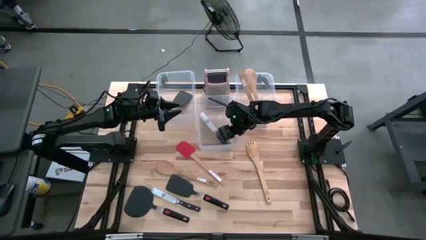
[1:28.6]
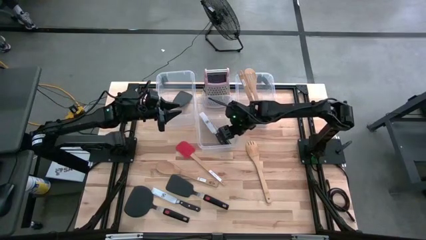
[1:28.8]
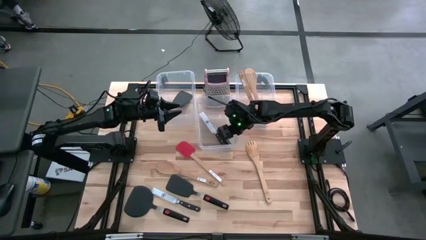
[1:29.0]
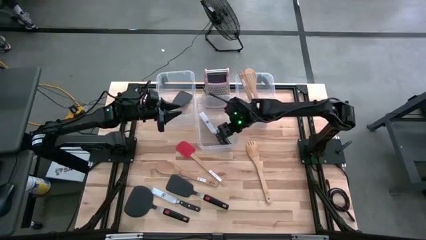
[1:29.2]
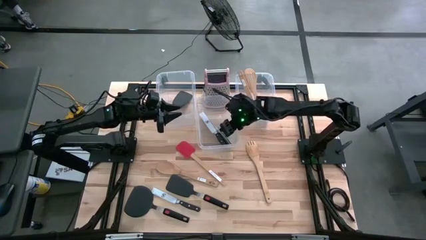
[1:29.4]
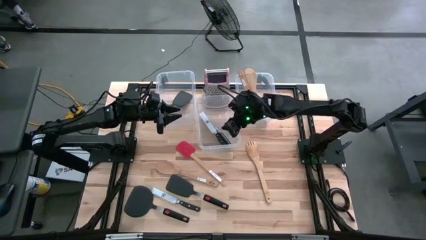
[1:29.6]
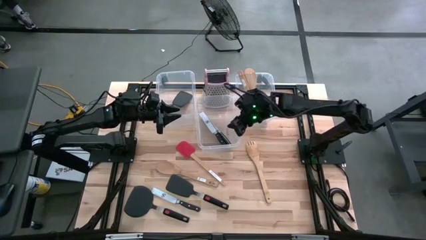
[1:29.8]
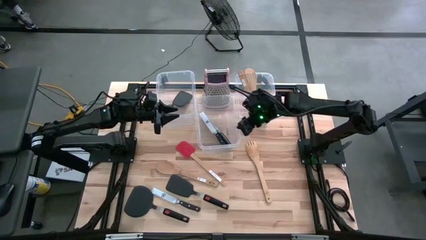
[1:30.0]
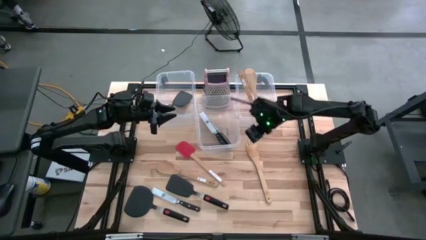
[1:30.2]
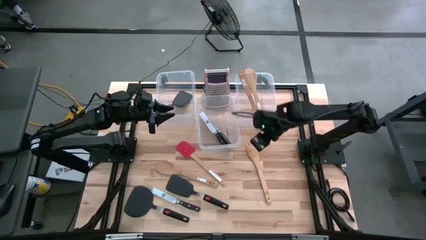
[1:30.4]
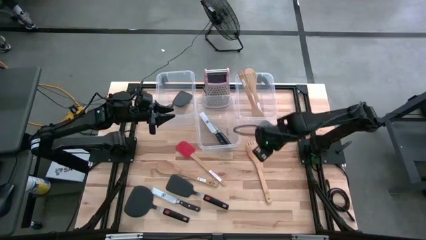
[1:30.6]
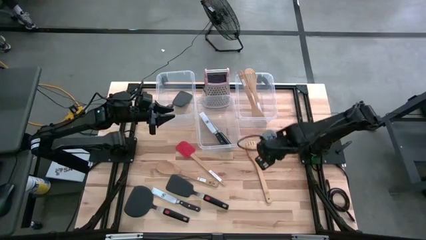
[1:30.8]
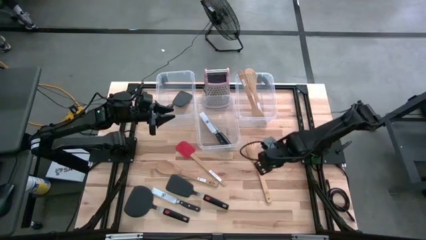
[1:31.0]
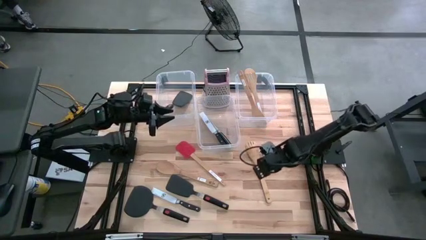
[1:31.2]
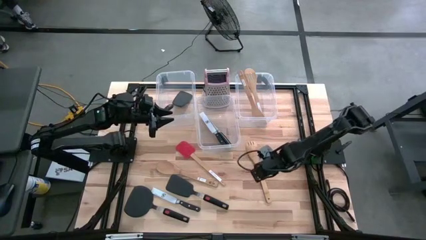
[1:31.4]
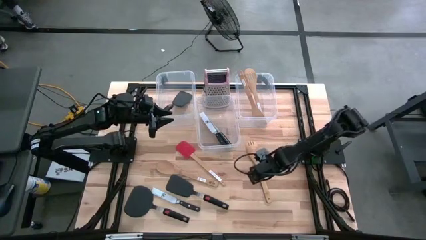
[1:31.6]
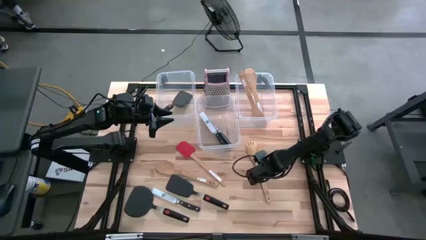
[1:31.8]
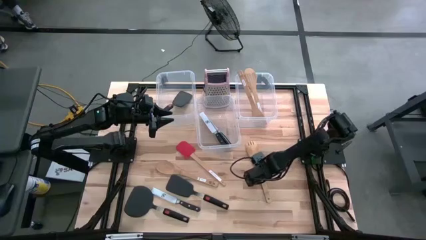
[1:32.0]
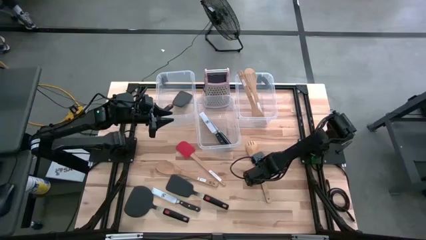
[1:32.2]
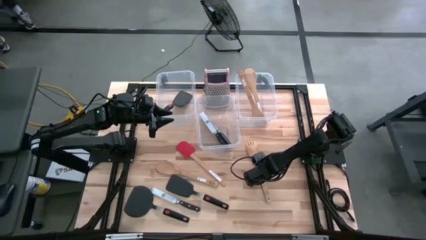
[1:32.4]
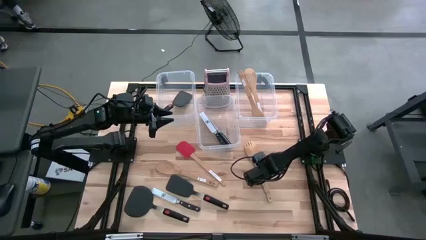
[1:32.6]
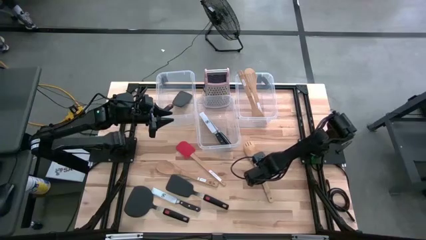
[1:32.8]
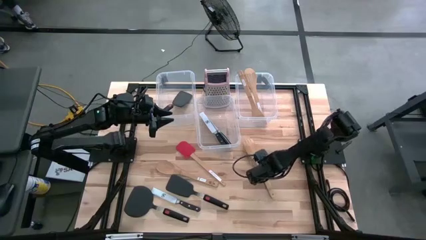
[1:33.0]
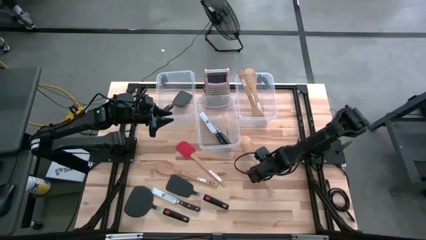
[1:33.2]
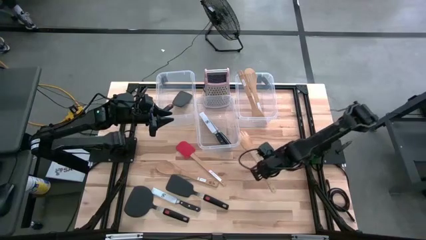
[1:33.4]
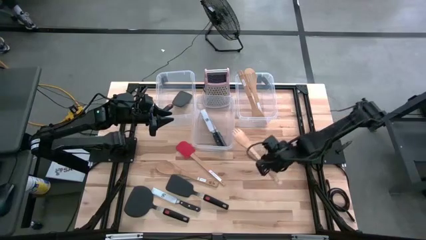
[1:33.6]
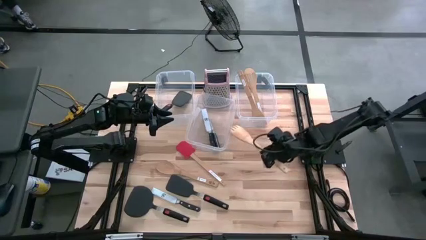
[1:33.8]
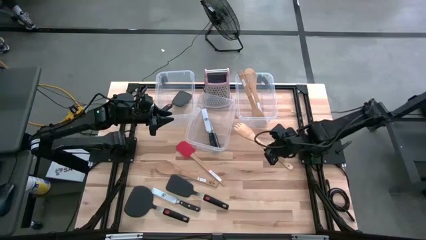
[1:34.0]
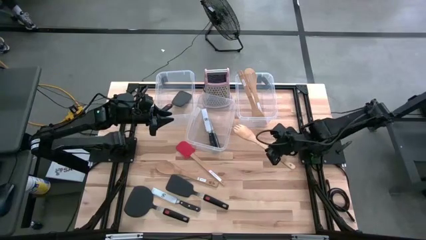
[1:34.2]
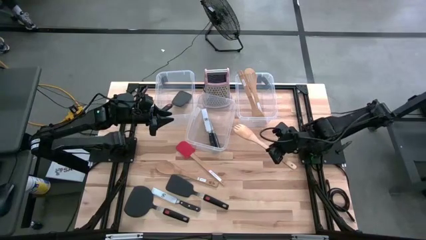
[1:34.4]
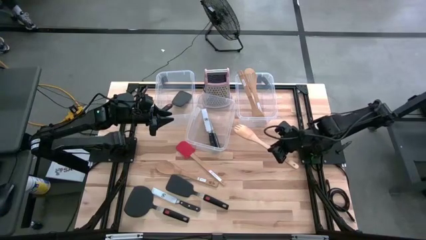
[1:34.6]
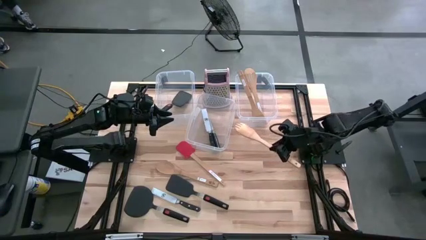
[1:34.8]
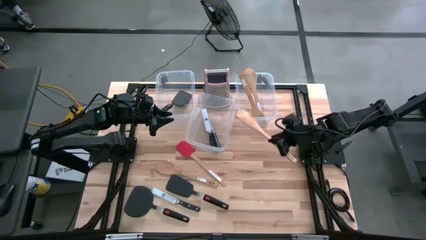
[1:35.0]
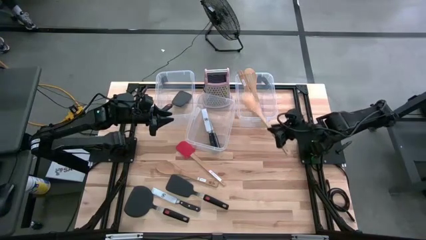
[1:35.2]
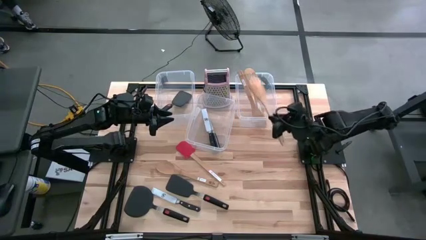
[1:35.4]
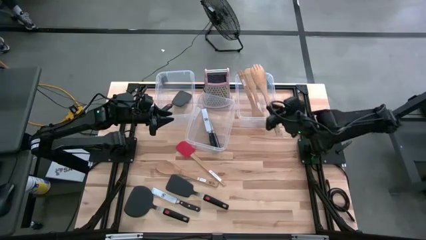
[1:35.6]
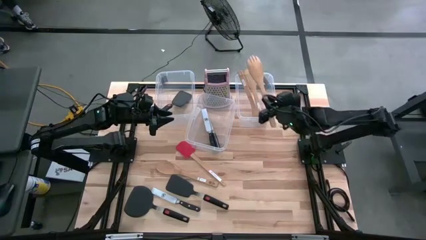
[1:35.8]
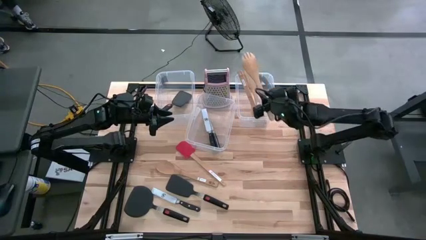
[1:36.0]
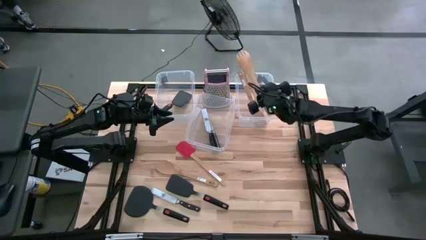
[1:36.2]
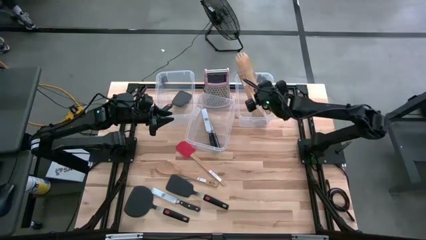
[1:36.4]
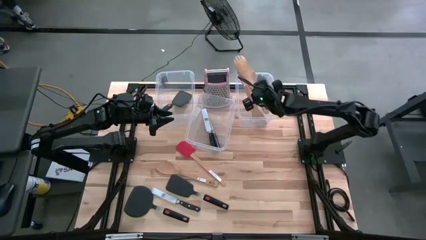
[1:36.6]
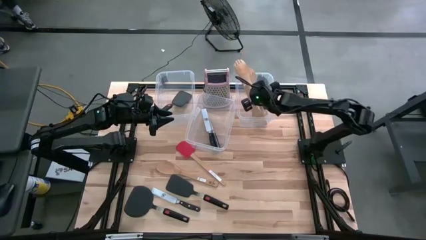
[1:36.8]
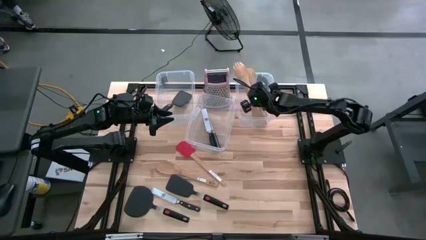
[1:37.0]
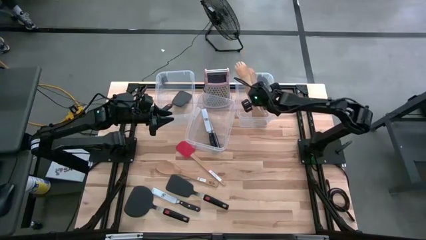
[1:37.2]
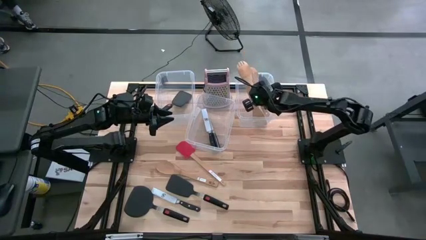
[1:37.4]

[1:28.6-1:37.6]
Task: Pick & Place Kitchen Items
Put the brown serving fork into the middle transparent bin

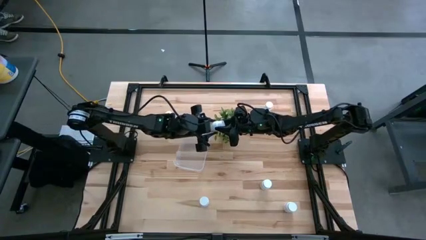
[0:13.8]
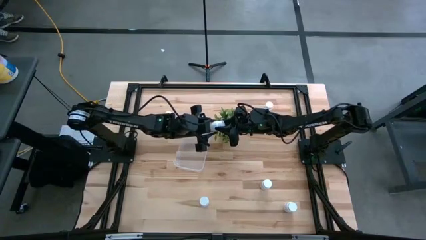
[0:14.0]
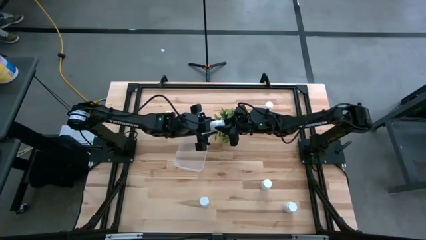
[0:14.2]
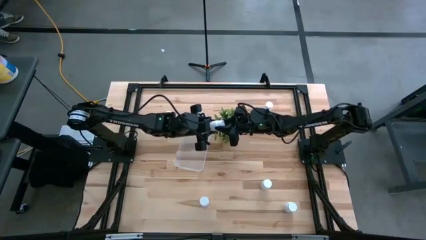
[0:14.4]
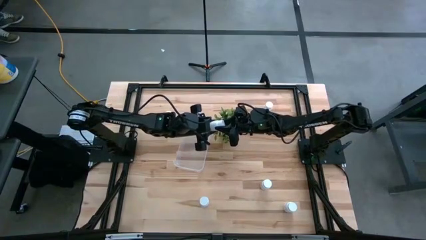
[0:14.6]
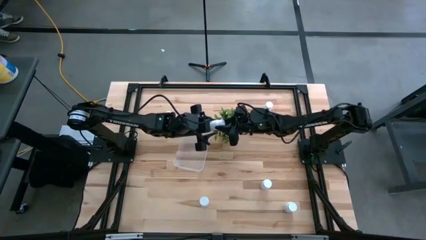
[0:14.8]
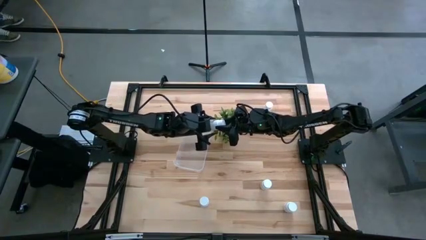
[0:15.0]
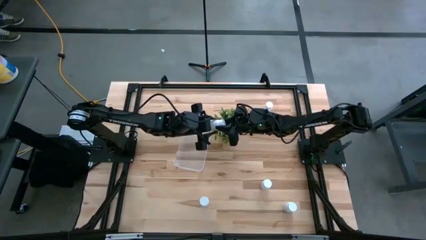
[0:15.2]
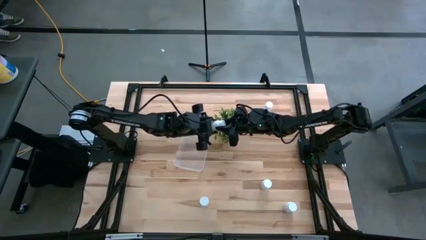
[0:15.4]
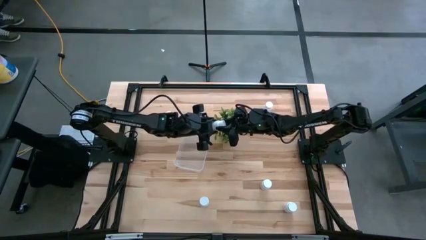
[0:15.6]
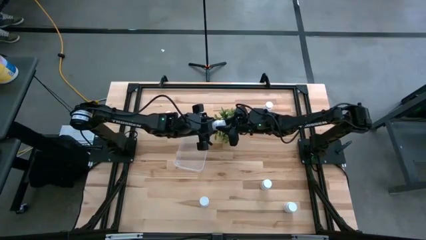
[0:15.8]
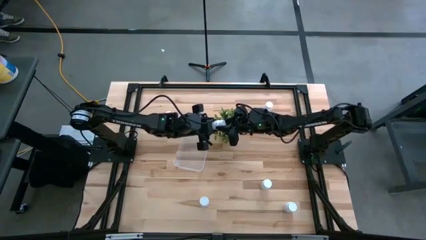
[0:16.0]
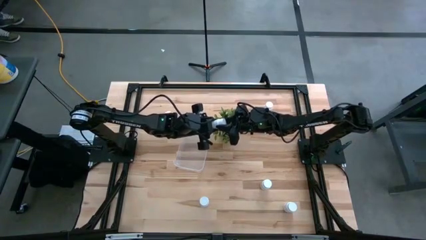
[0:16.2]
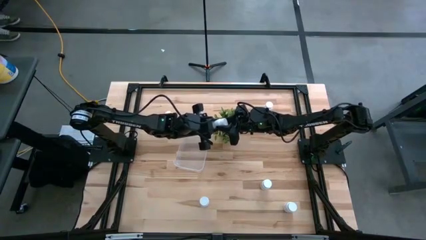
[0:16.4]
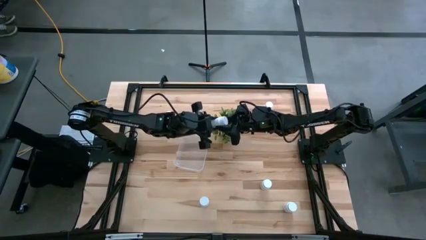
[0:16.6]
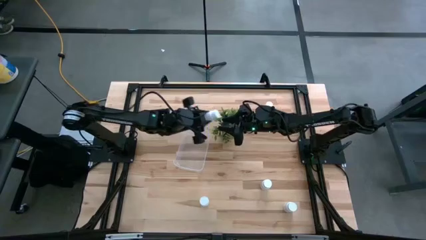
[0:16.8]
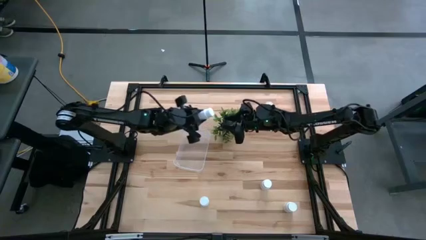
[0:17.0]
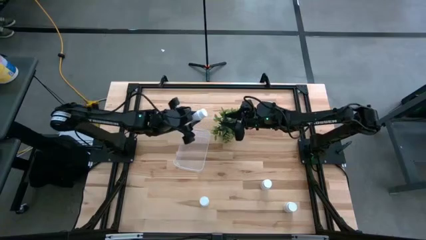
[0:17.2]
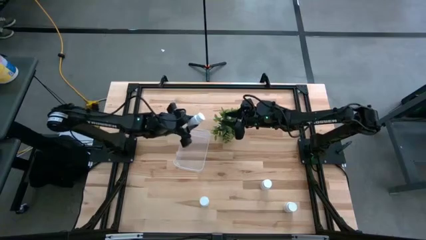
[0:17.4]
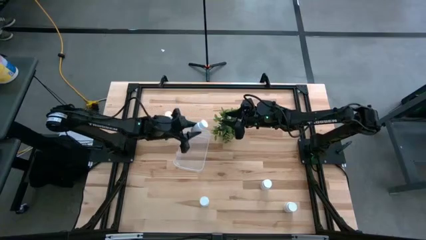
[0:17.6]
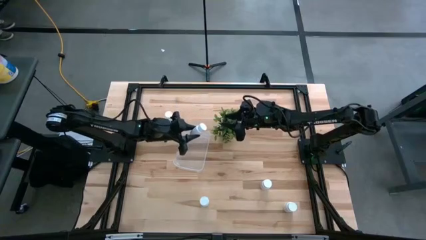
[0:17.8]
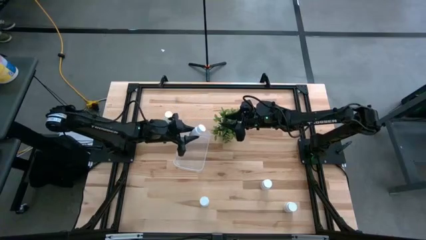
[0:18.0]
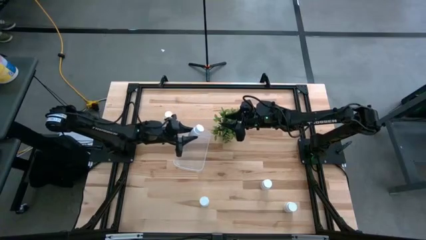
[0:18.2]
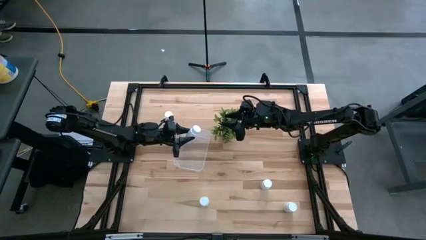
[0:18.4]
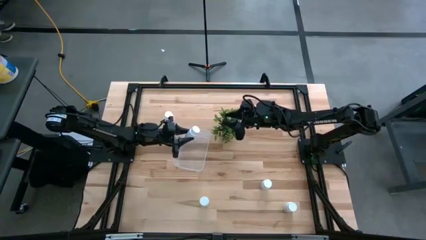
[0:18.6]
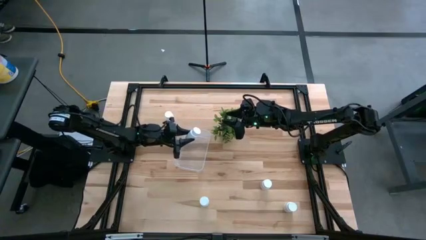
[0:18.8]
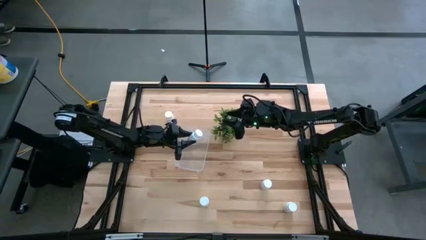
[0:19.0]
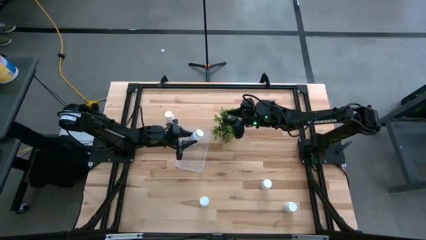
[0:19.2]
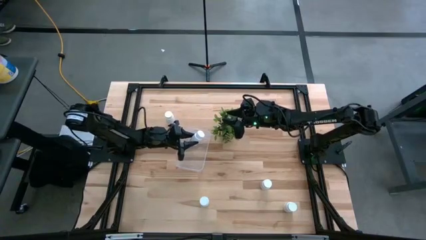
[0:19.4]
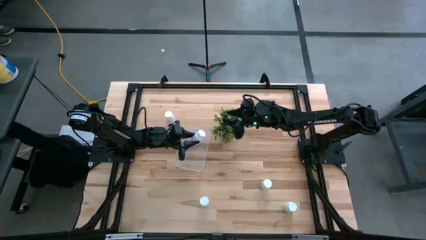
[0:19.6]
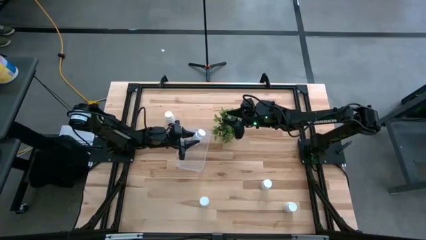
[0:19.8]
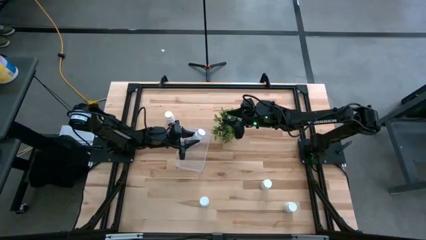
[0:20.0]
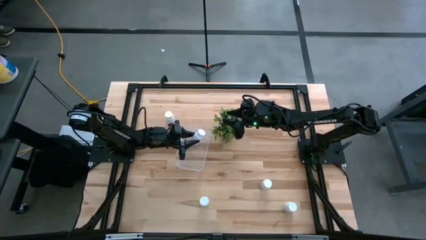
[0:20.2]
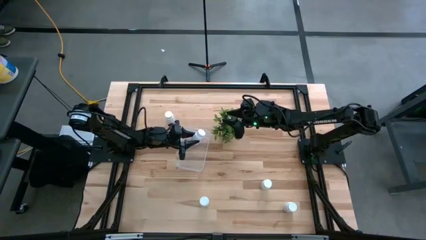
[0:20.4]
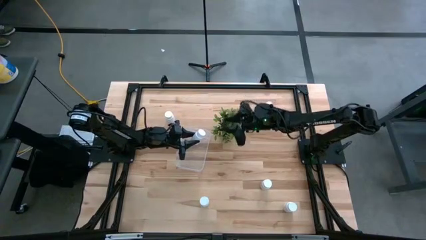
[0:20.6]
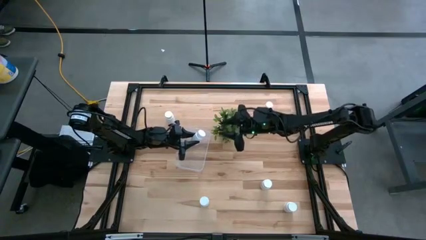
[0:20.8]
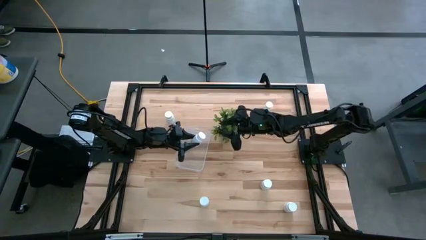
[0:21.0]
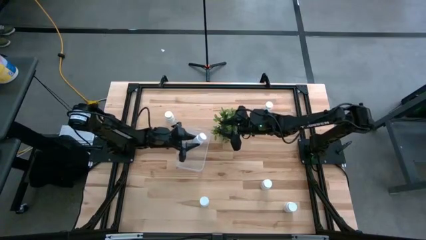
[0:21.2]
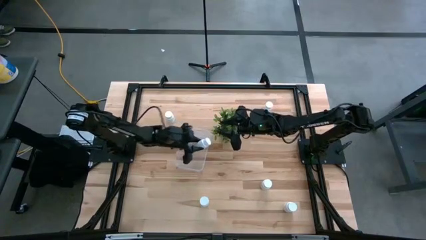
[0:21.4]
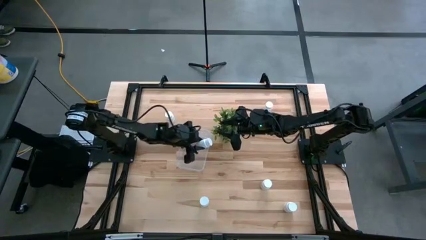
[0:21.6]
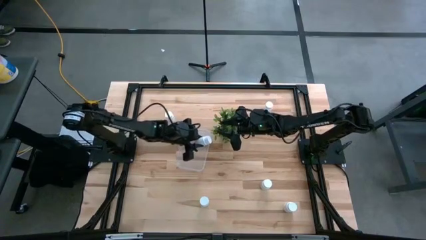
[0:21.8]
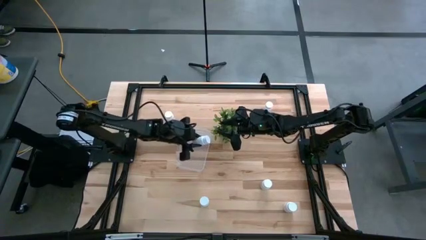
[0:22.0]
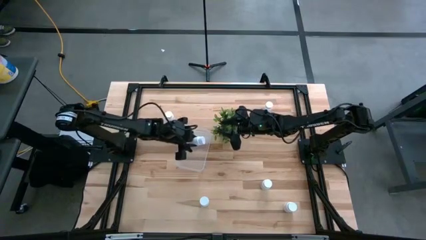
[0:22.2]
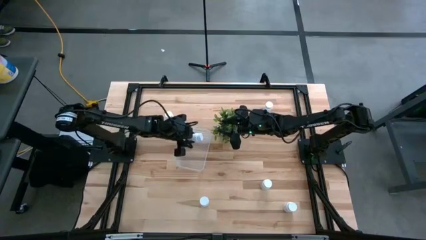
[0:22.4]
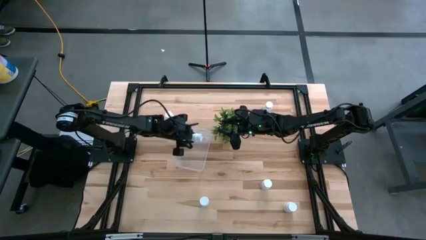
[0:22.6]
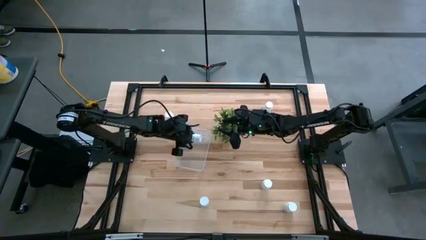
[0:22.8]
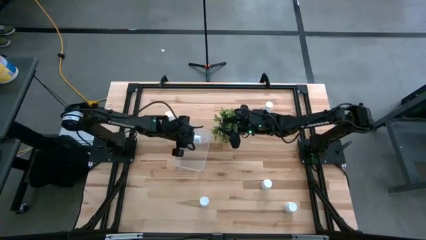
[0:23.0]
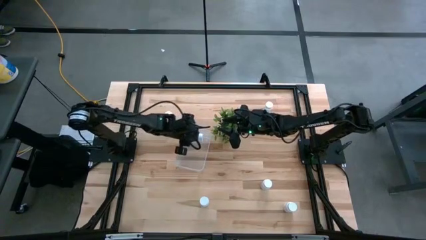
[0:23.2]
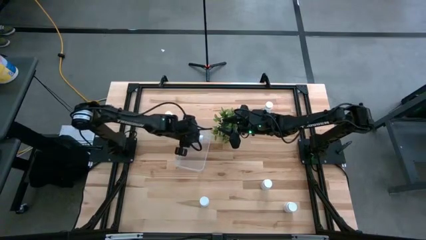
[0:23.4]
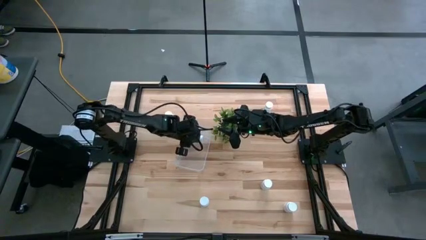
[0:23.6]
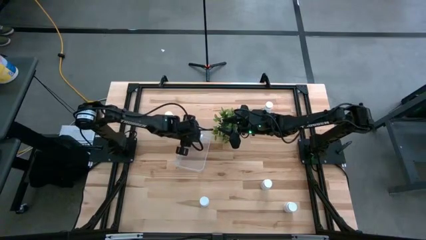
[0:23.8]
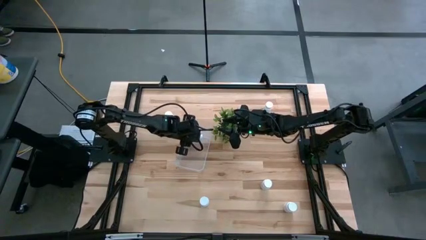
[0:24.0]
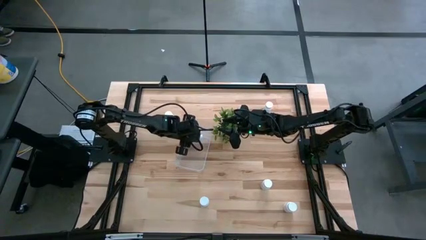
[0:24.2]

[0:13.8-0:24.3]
Task: Pick and place pill bottles into a basket
Put the white pill bottle into the transparent bin
